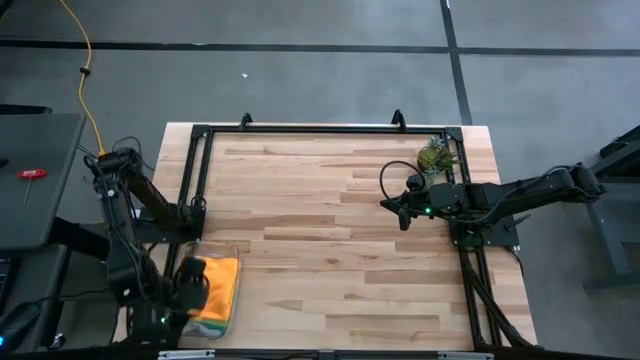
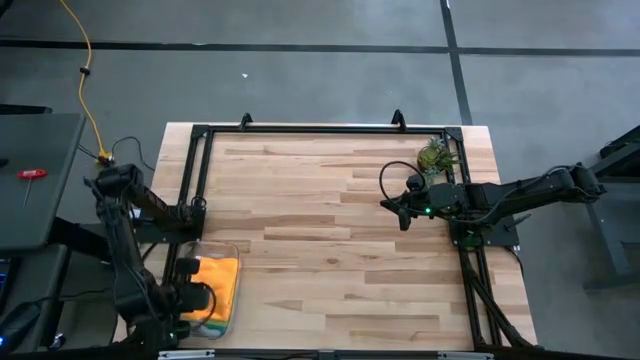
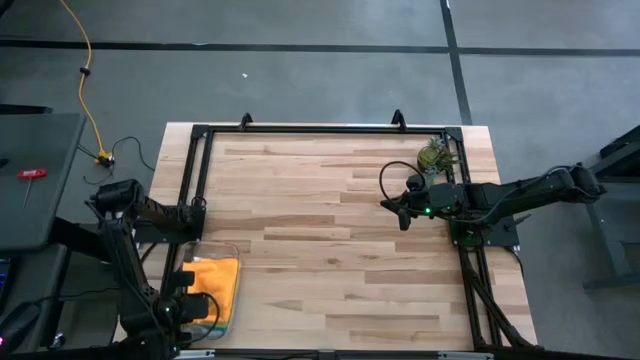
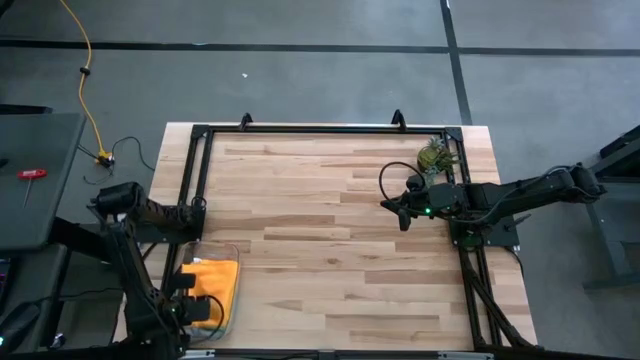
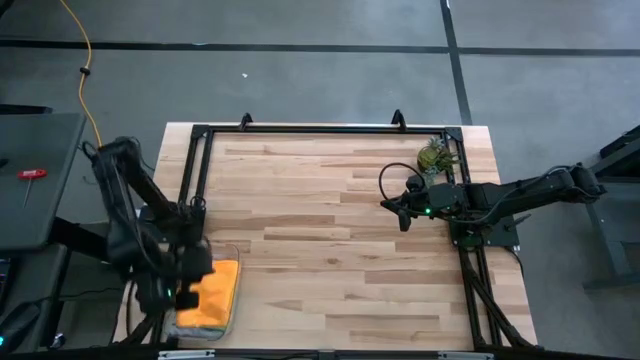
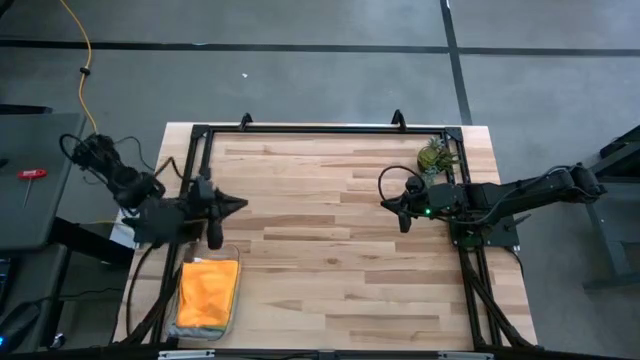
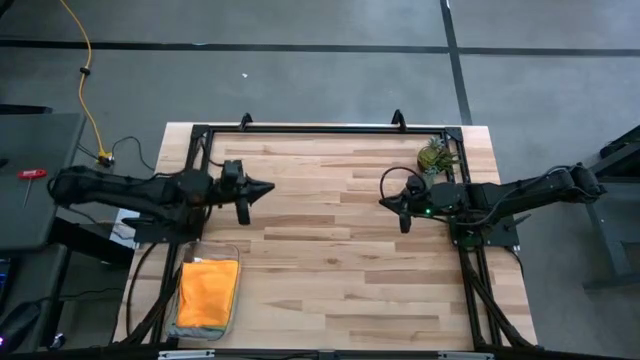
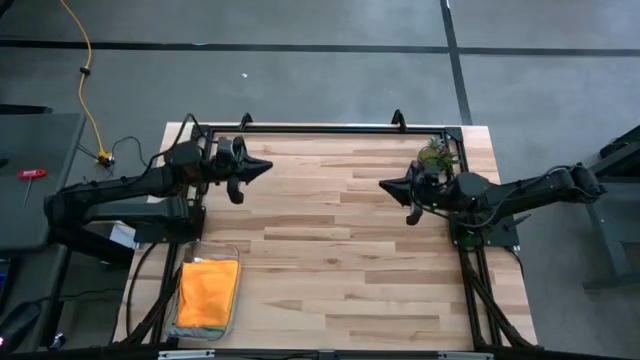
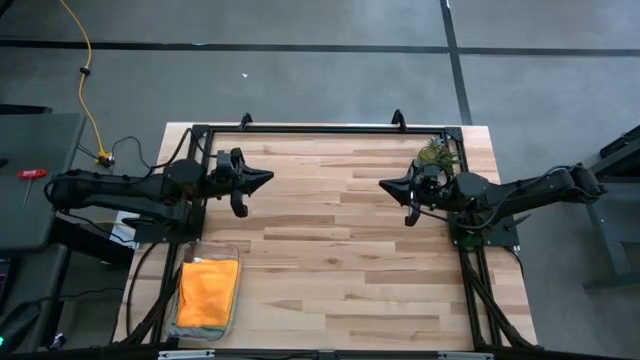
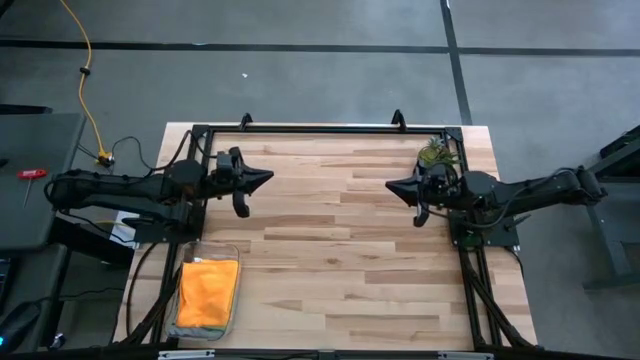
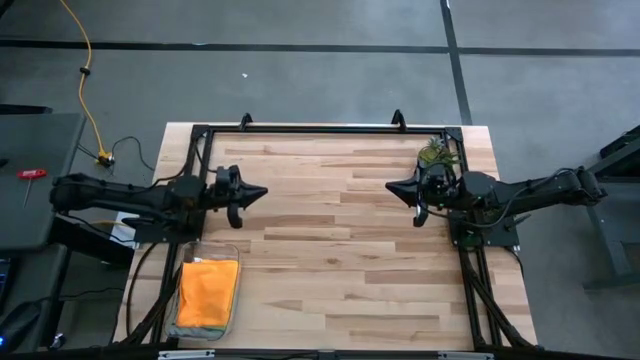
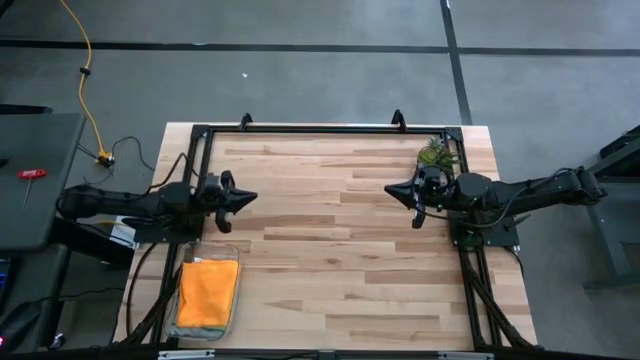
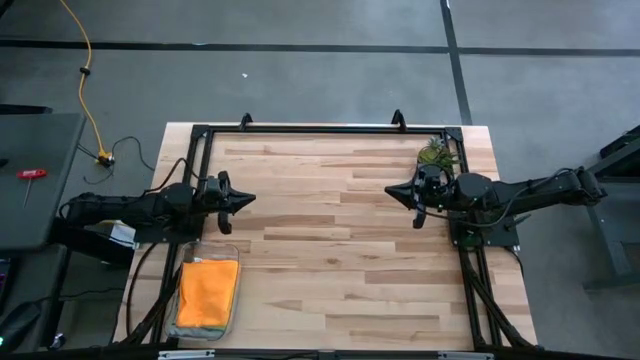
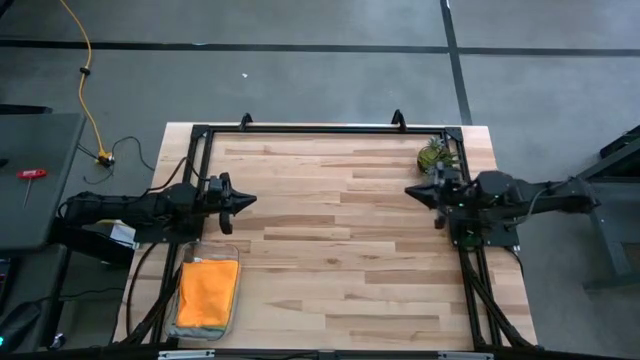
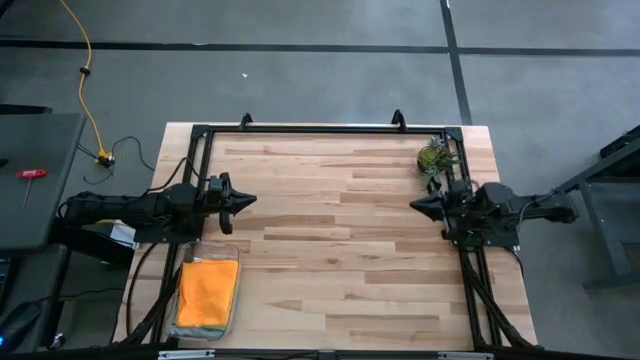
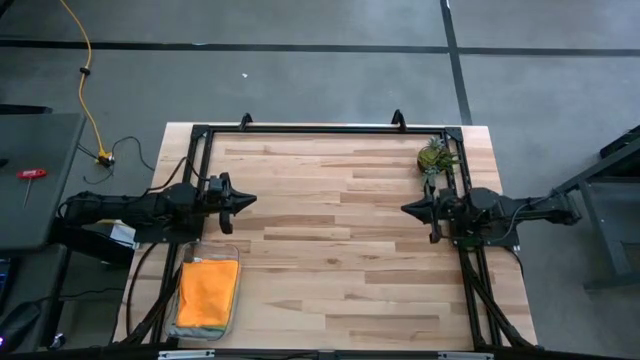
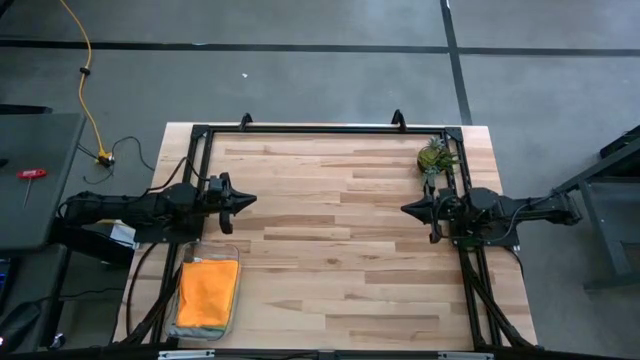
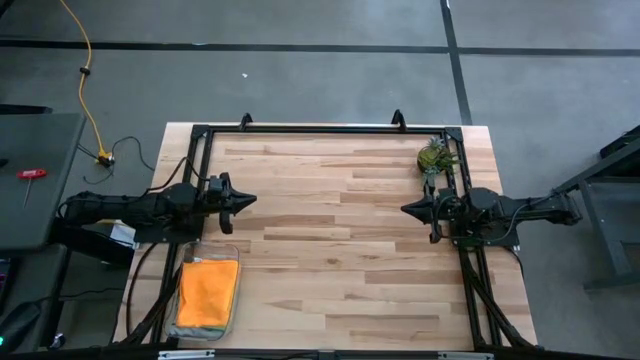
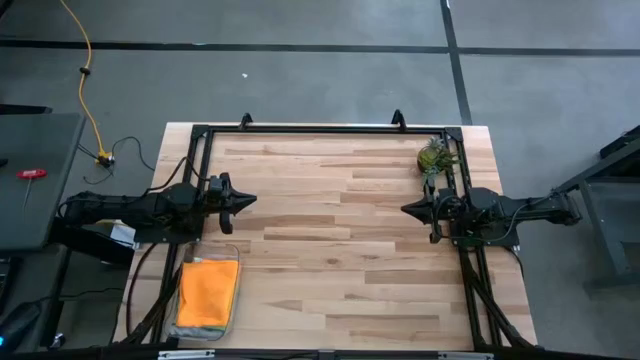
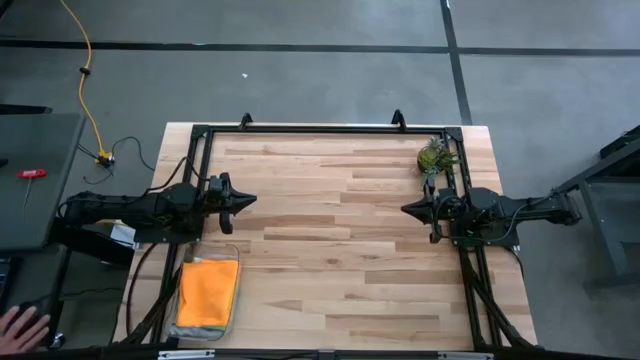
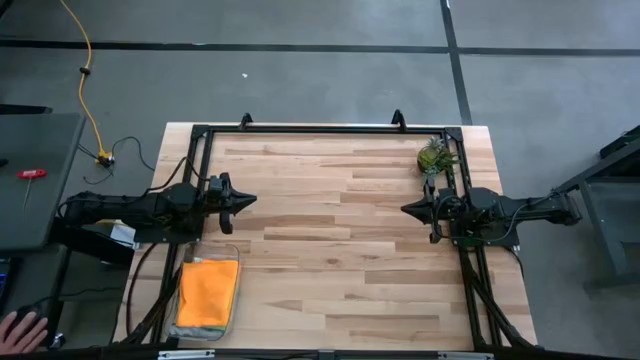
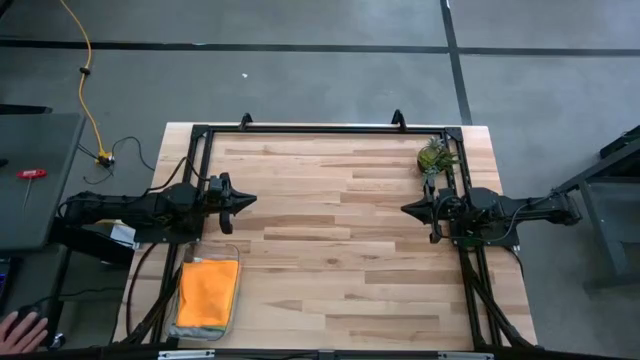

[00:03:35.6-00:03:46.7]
Task: Fold microfiber towels
Return to Home Position

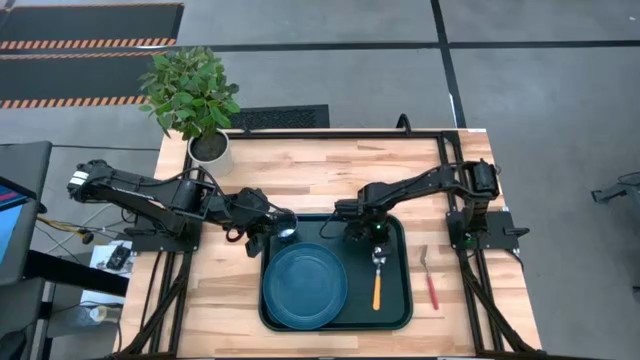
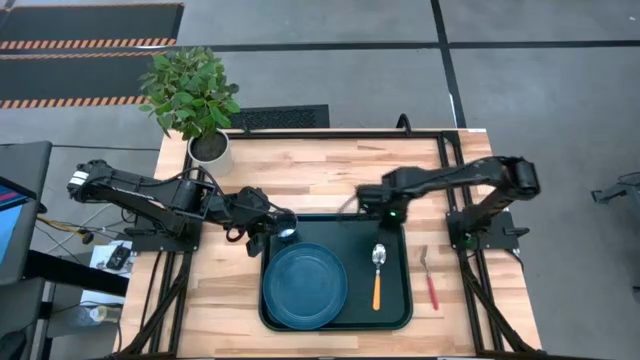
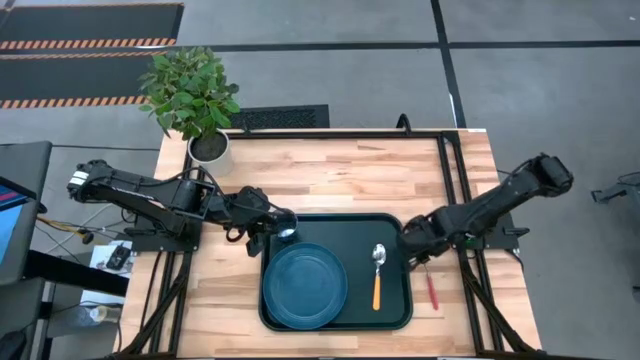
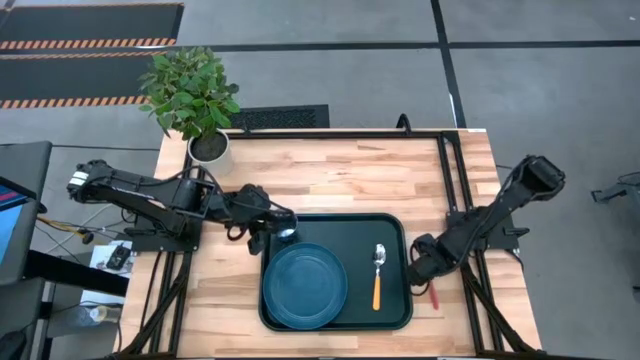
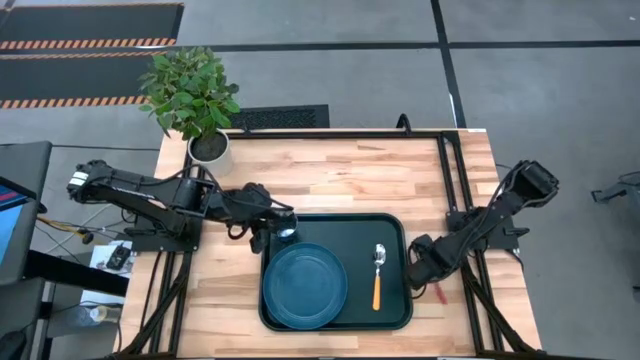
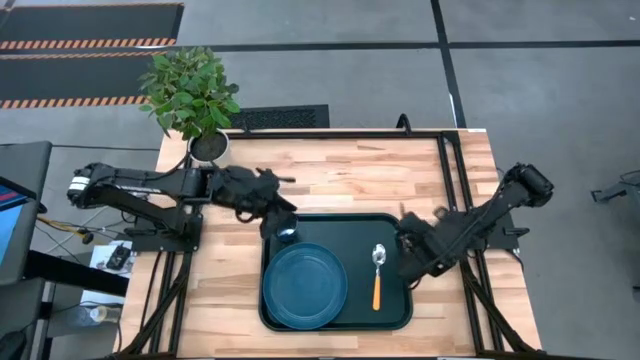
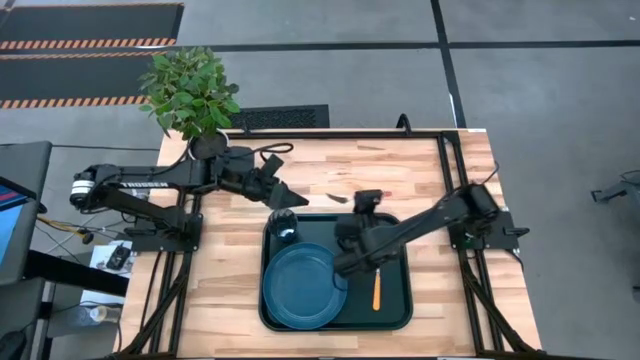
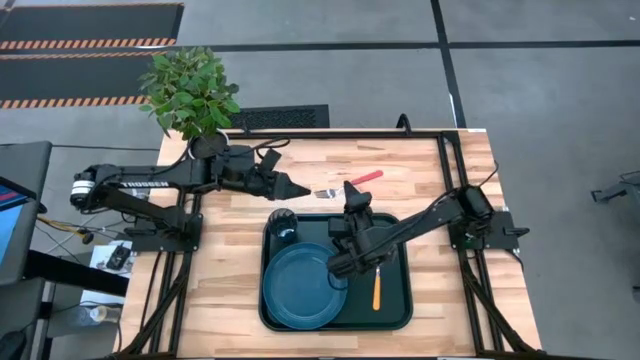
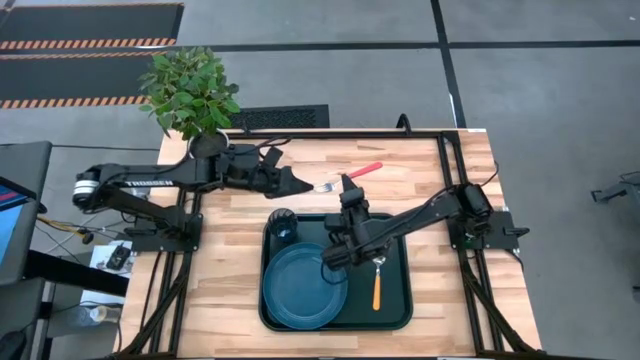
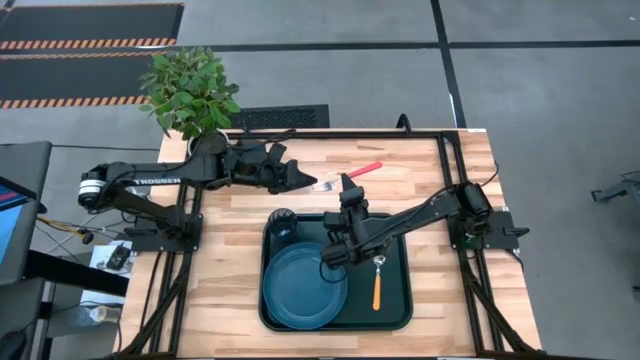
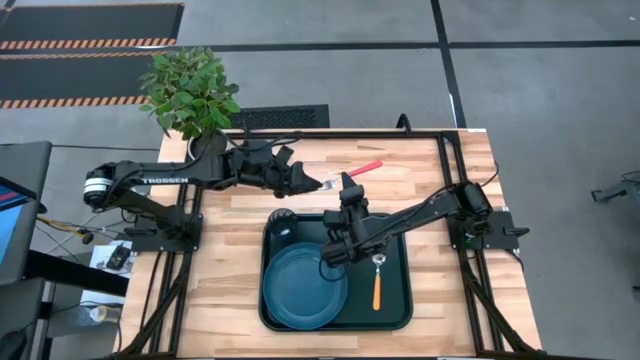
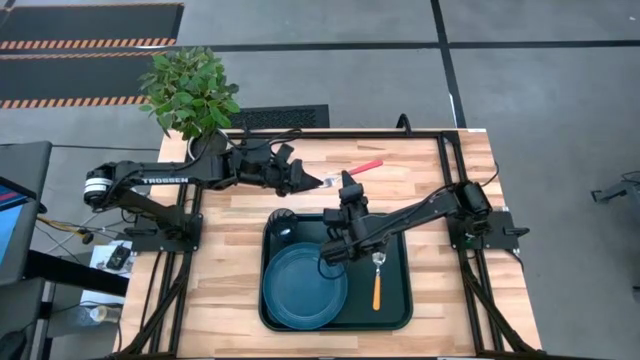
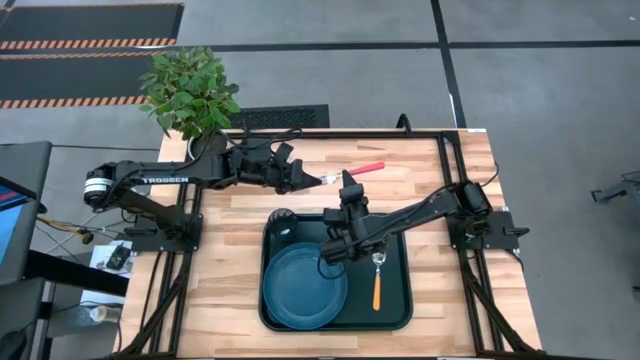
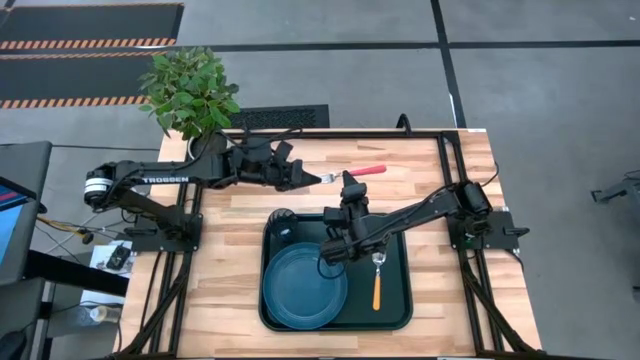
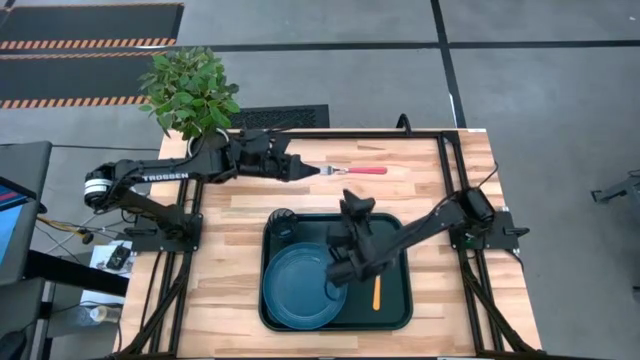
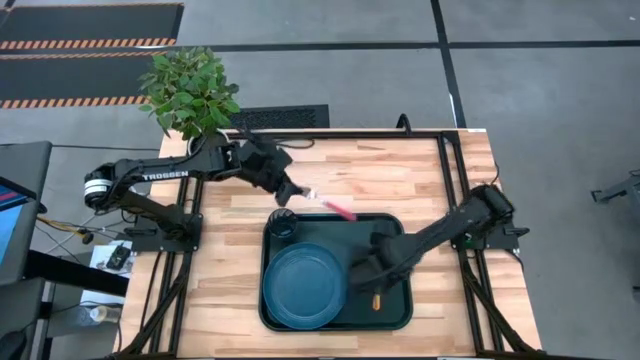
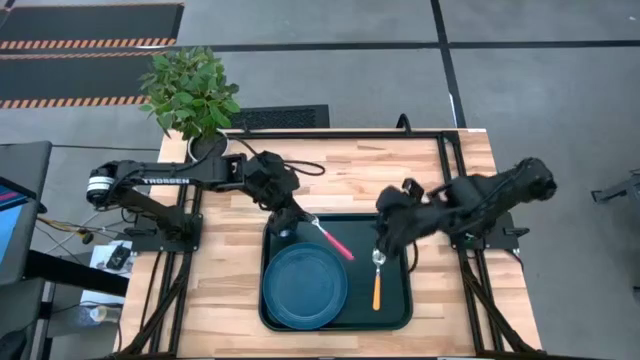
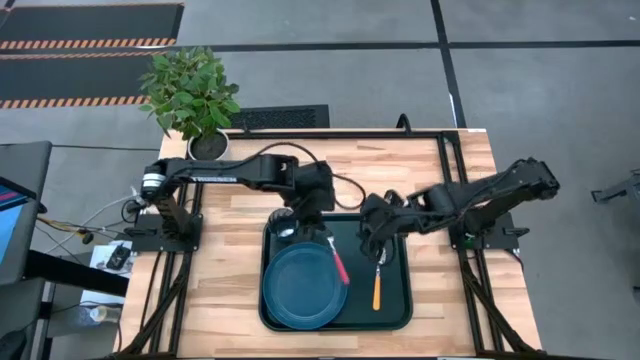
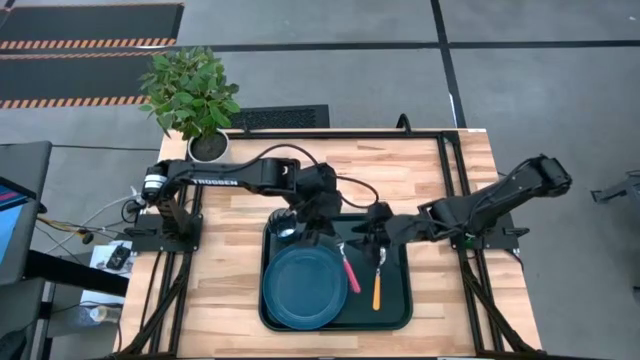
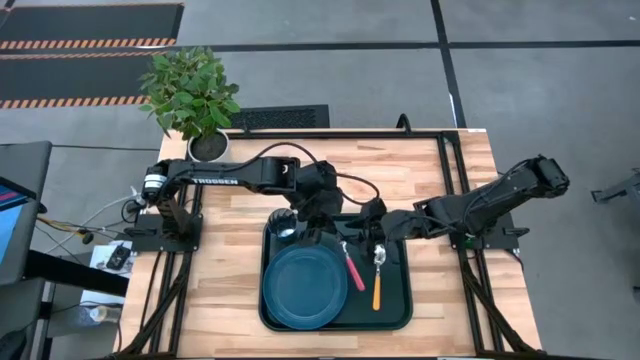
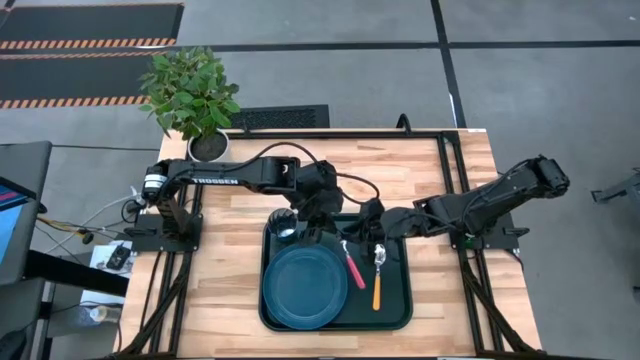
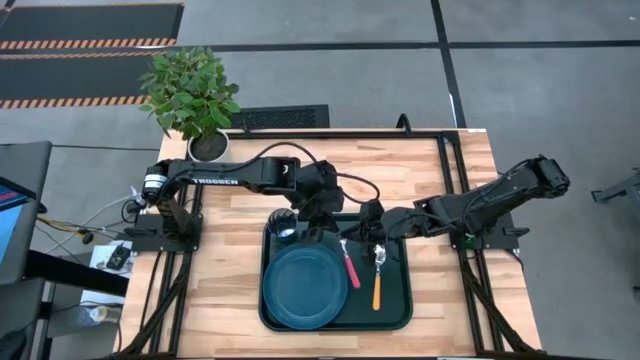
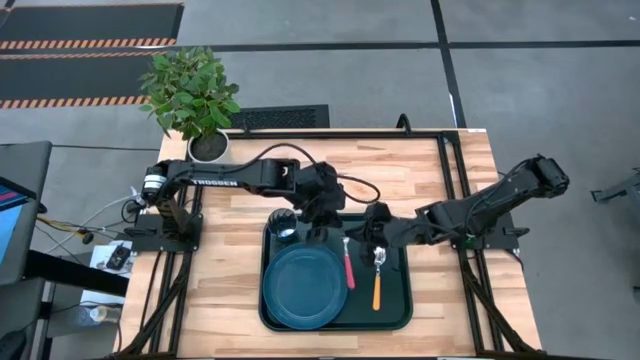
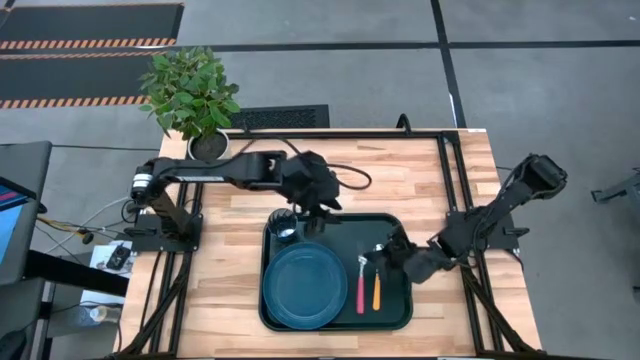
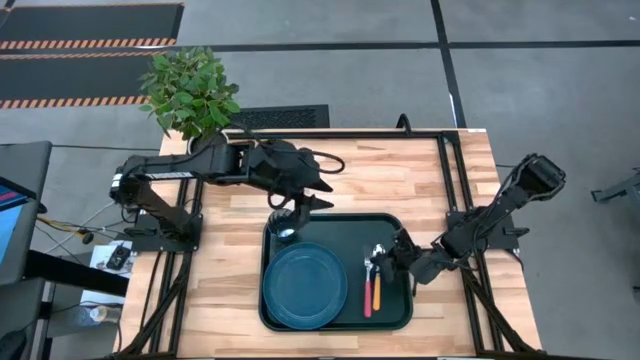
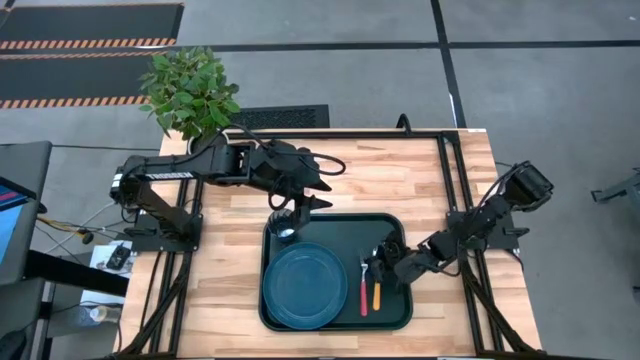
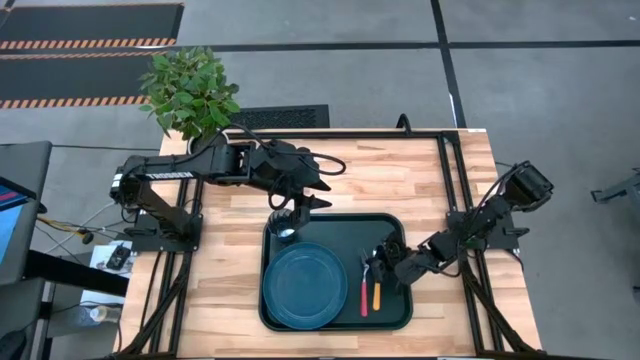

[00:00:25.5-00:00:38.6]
Task: Pick and place plate/cup/fork/spoon on tray
Put the pink fork on the black serving tray to the left of the brown spoon
